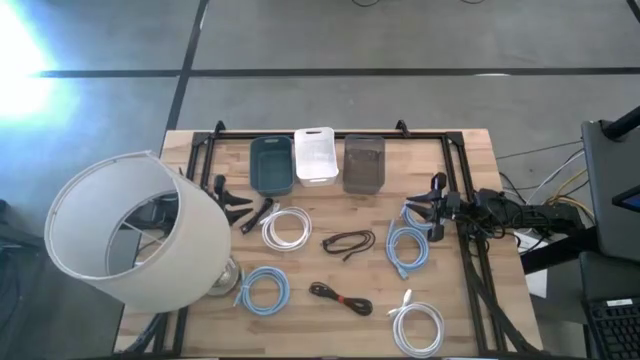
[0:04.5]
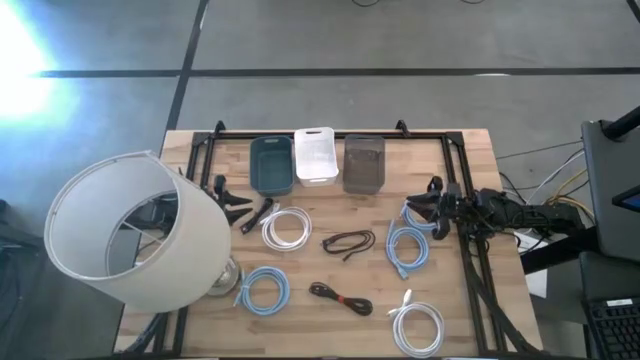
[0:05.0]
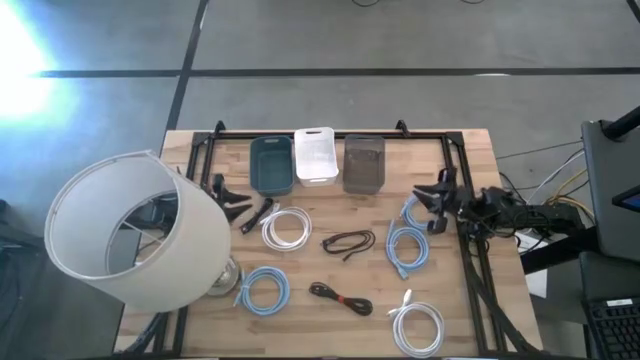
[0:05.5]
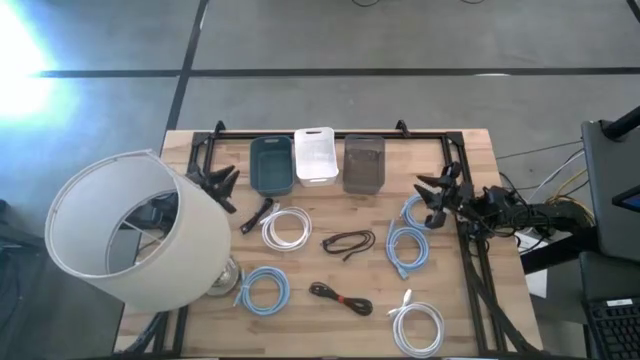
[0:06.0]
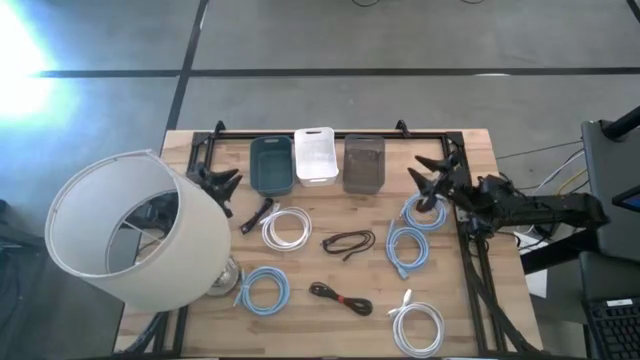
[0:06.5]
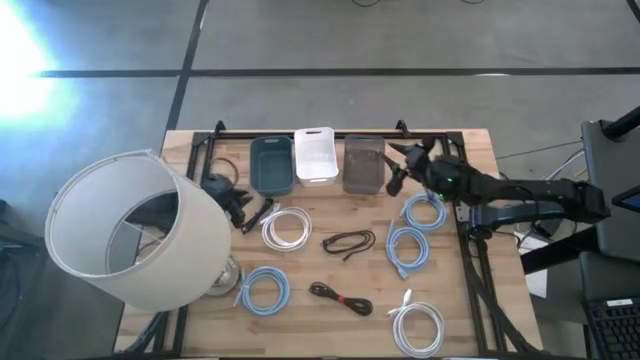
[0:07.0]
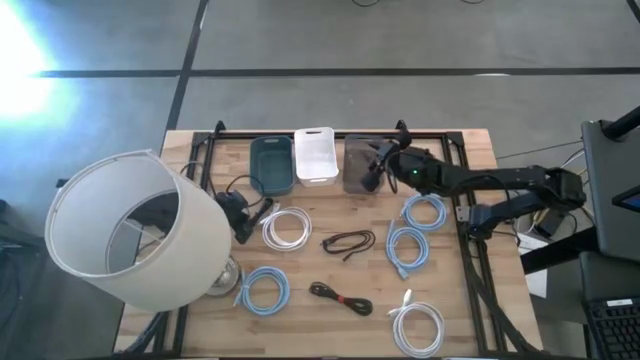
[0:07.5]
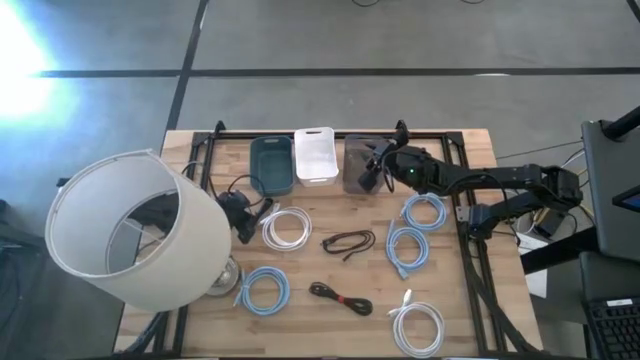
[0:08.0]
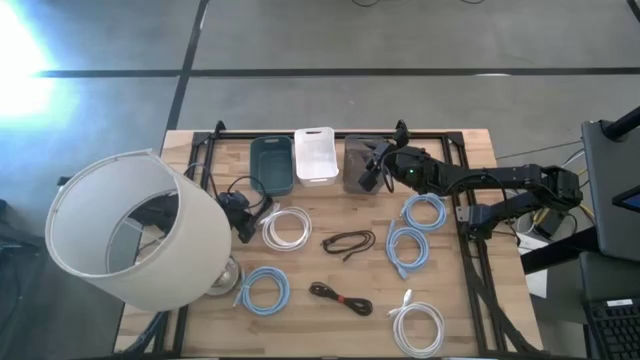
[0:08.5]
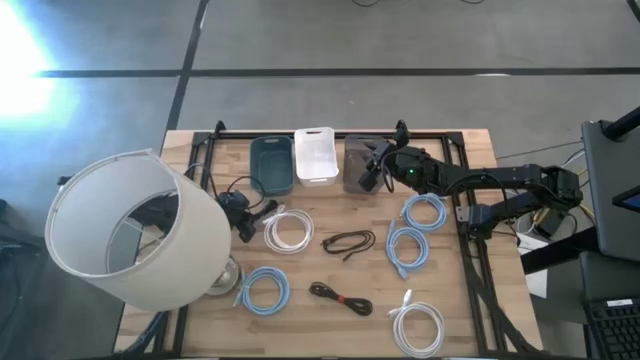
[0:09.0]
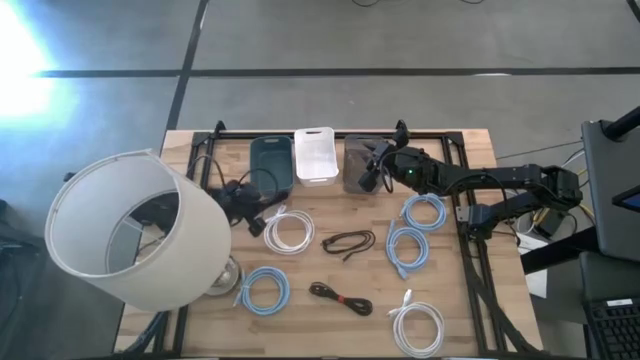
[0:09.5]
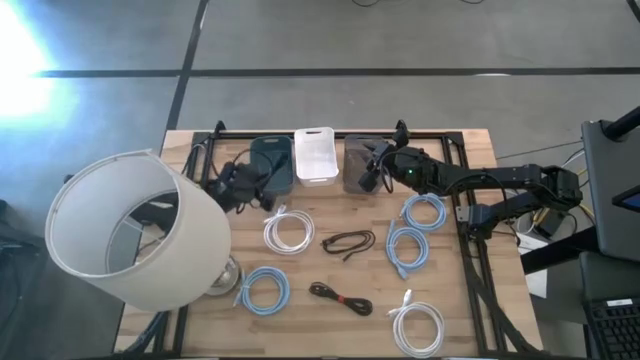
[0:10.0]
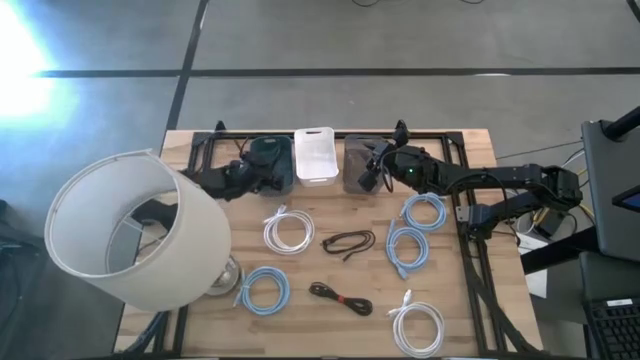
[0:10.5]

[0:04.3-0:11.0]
Task: Pick & Place USB Port
Put the top left black USB cable into the blue bin

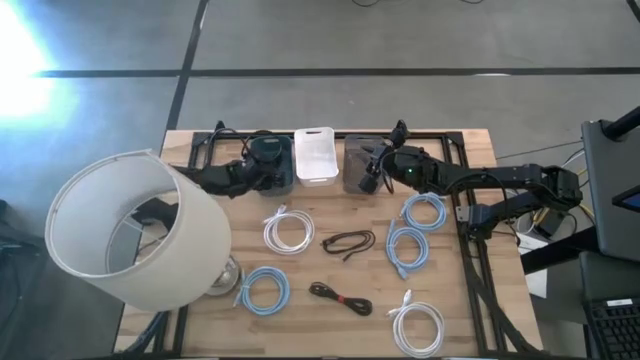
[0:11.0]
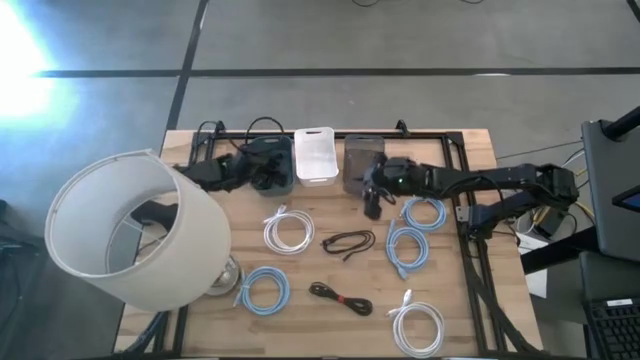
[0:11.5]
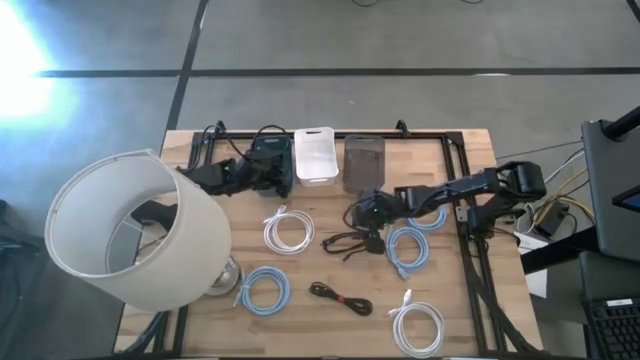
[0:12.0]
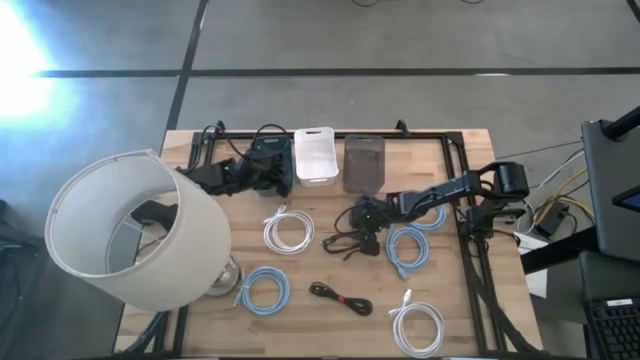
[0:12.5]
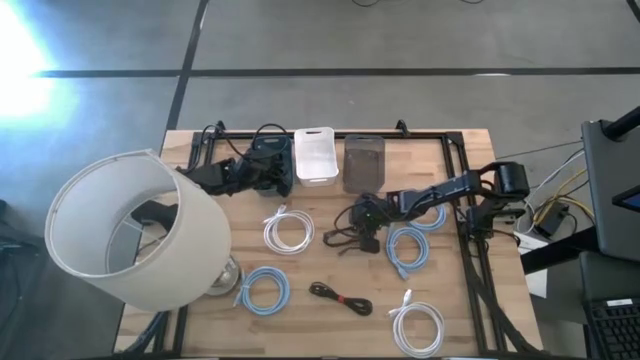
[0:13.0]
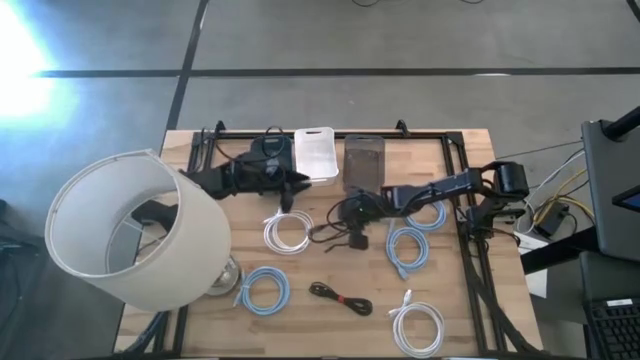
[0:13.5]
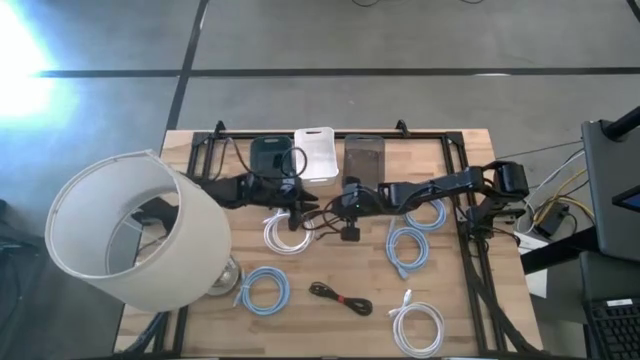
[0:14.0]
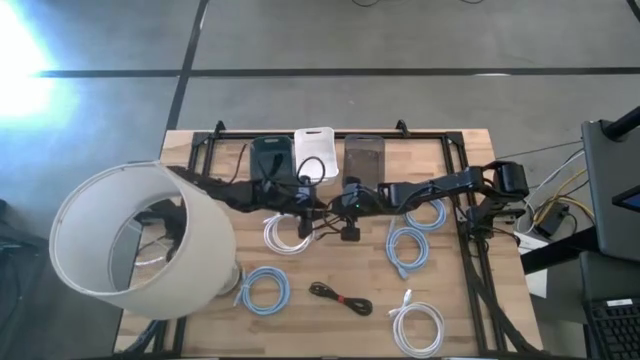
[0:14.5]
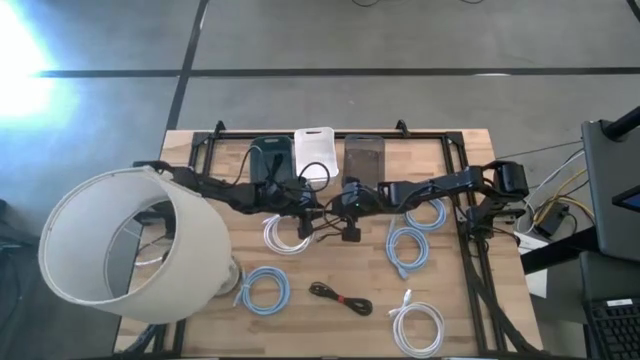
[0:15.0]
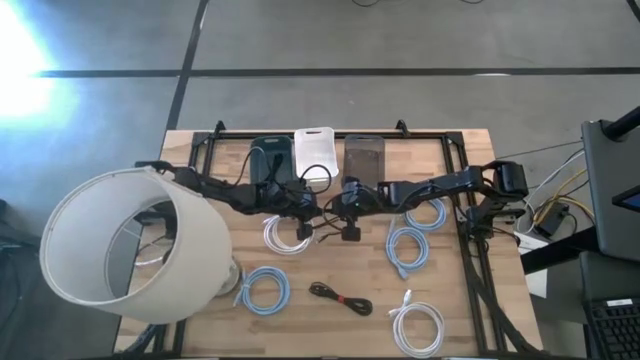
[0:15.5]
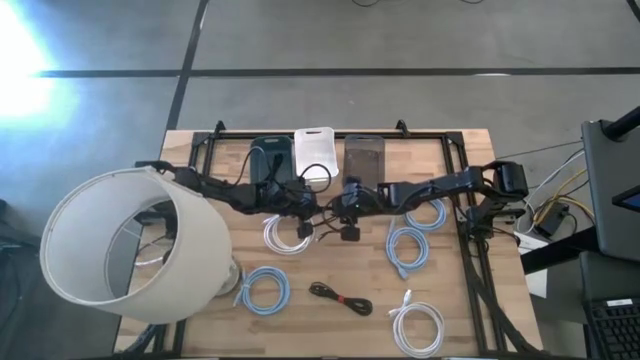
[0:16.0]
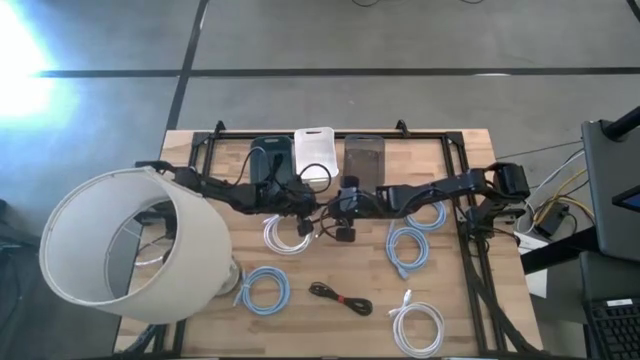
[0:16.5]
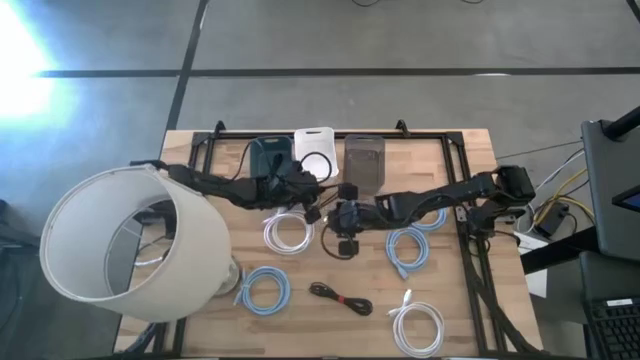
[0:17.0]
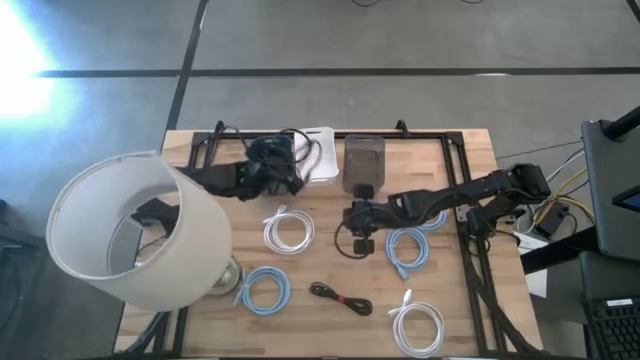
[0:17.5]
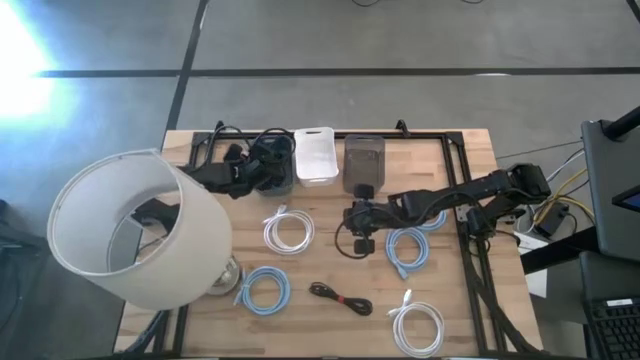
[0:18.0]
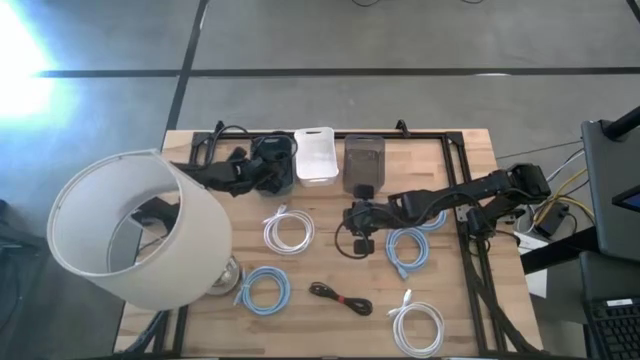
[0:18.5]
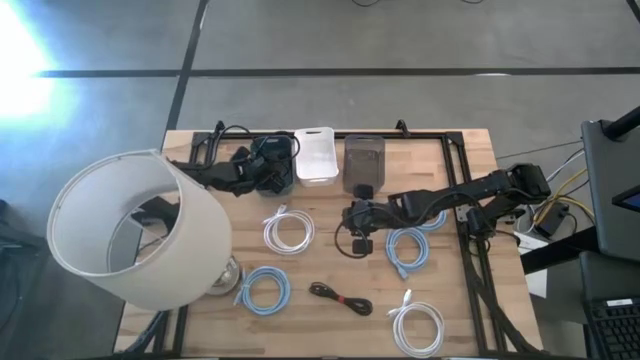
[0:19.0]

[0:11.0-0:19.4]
Put the top black USB cable into the blue bin

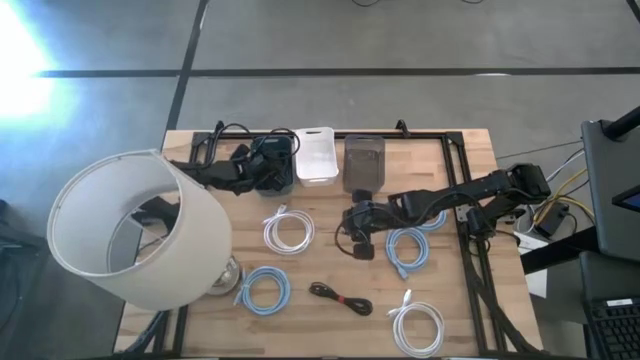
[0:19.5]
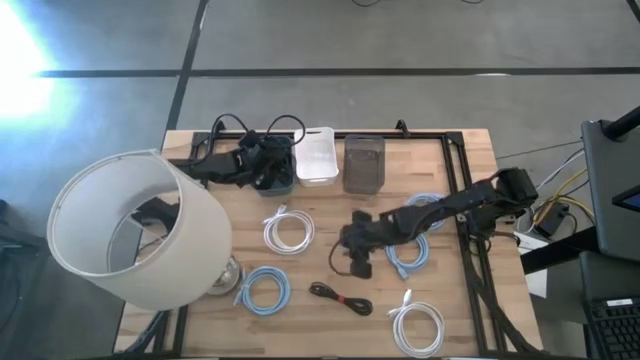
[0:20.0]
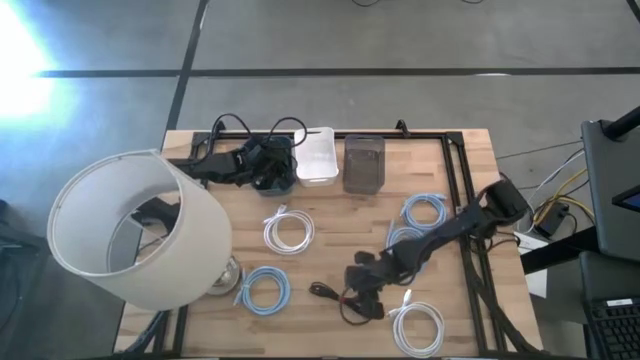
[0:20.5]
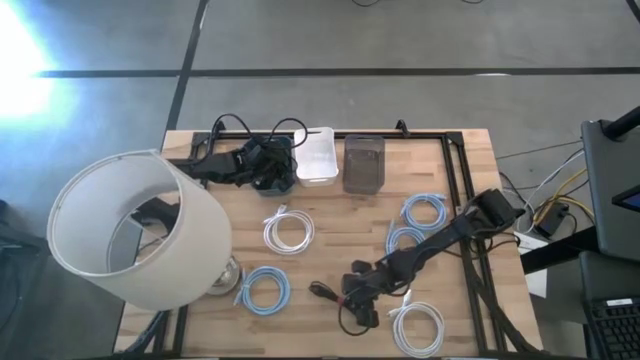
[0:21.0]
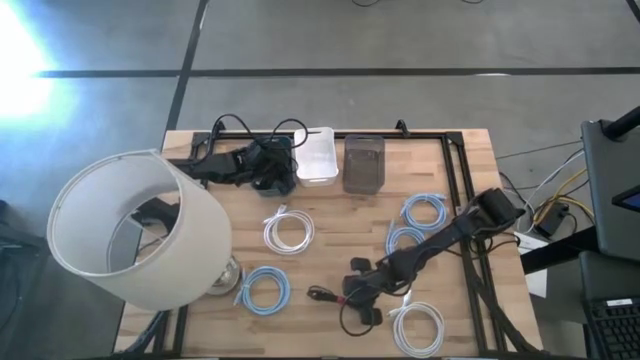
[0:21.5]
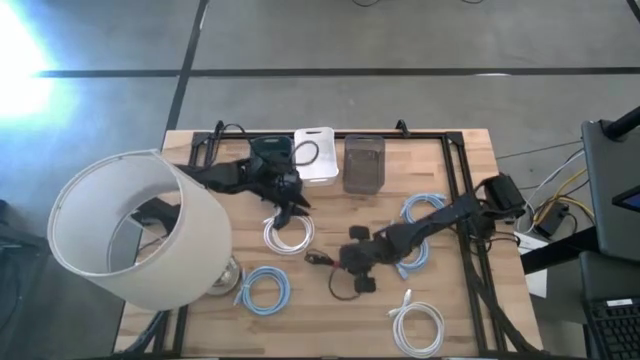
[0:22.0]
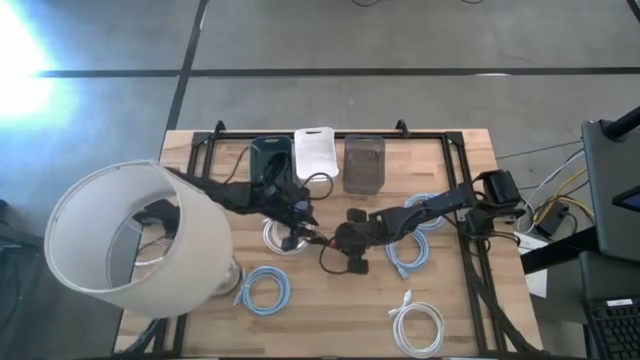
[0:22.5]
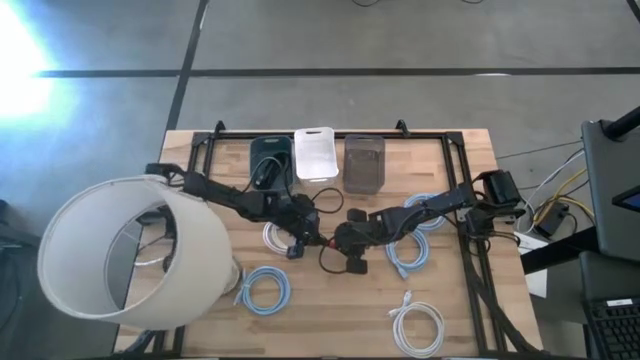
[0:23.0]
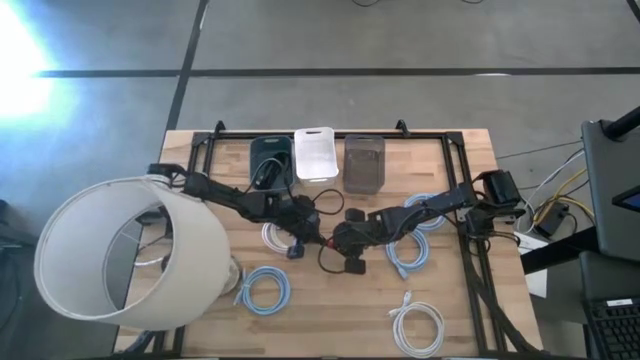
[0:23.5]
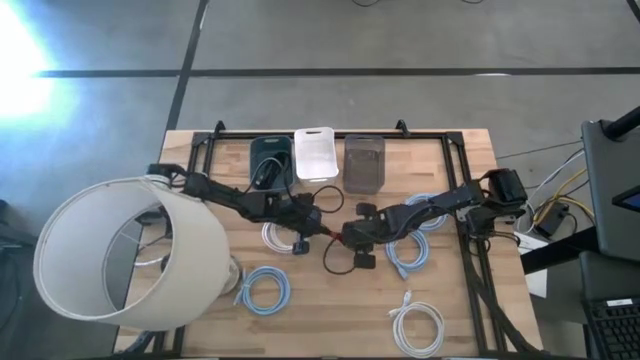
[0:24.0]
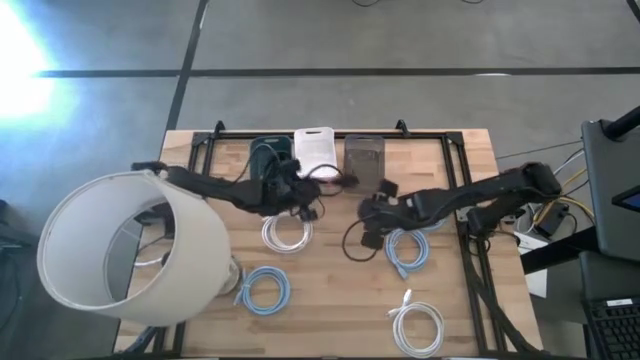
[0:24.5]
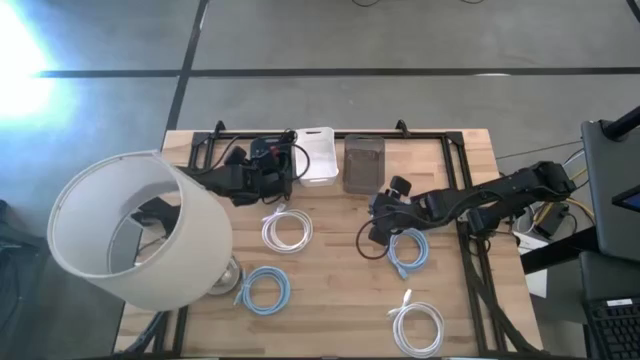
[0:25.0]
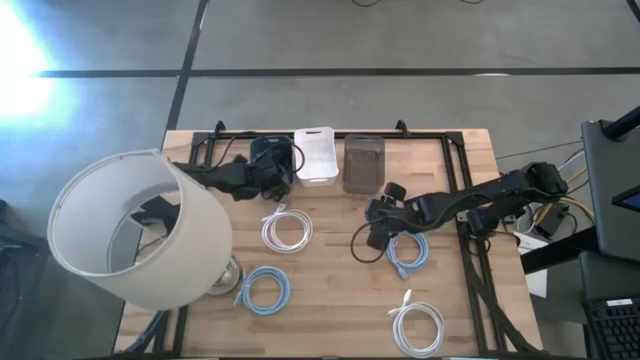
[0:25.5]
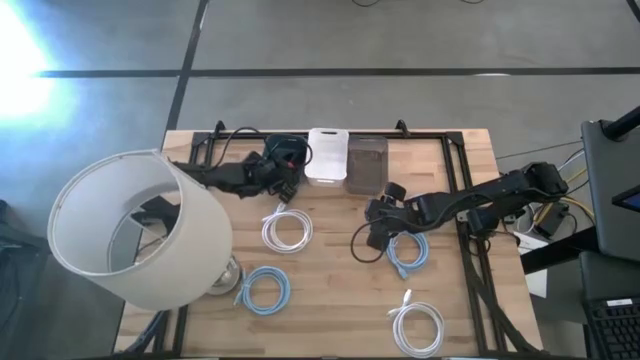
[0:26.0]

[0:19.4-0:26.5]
Put the black USB cable into the blue bin
